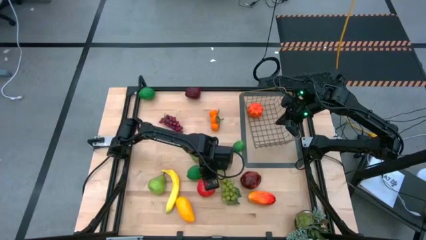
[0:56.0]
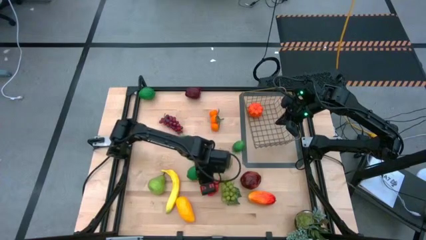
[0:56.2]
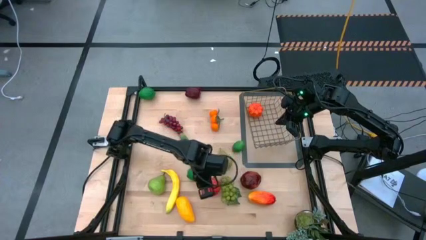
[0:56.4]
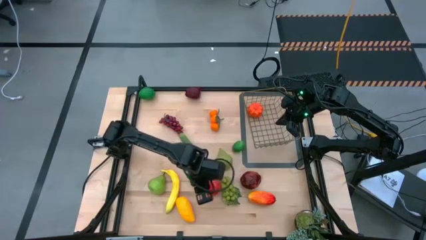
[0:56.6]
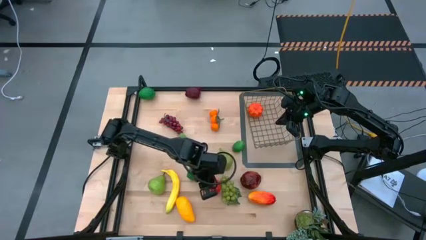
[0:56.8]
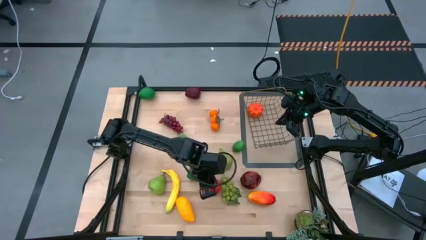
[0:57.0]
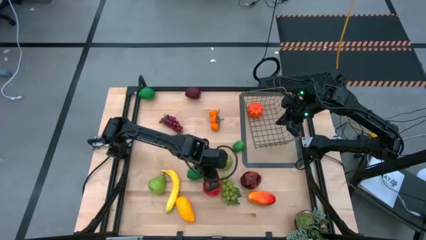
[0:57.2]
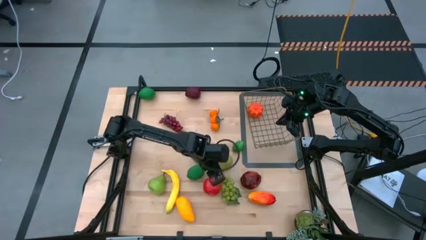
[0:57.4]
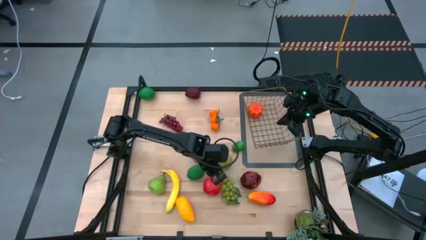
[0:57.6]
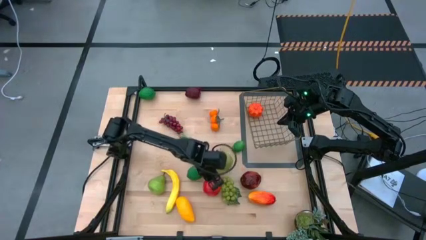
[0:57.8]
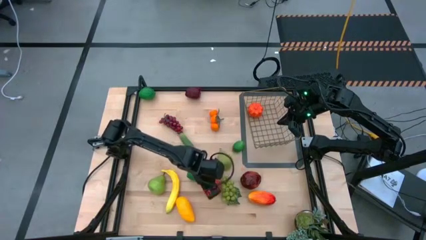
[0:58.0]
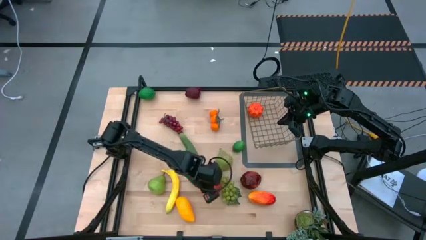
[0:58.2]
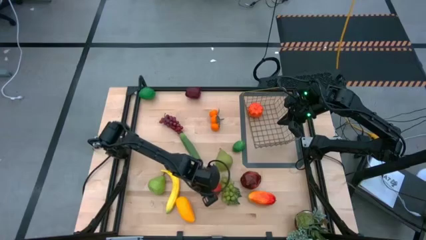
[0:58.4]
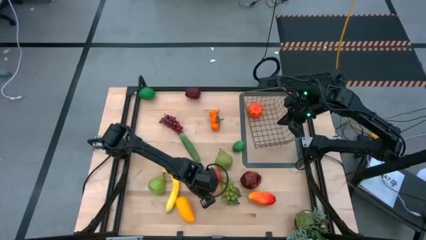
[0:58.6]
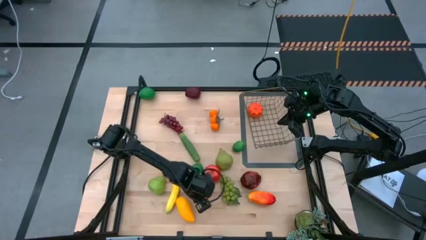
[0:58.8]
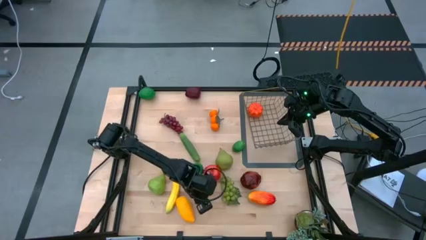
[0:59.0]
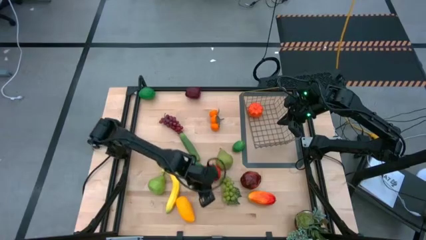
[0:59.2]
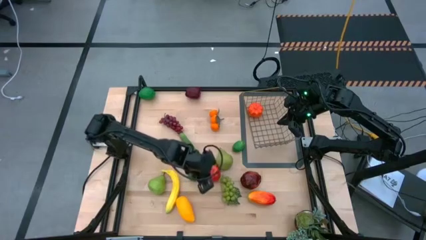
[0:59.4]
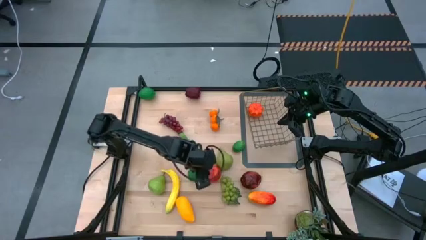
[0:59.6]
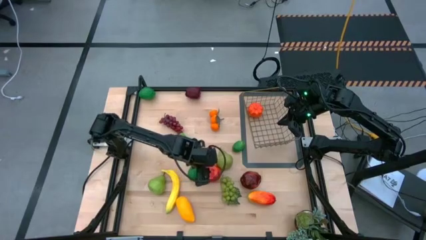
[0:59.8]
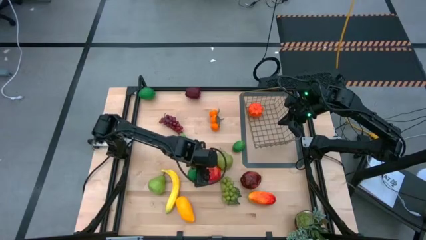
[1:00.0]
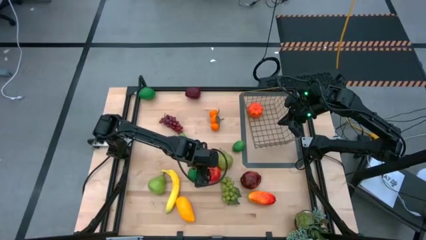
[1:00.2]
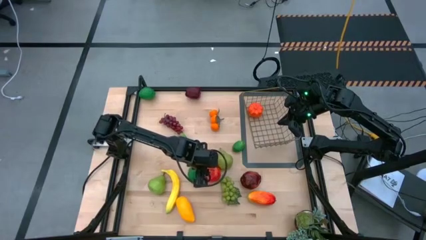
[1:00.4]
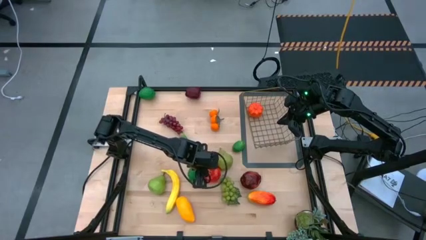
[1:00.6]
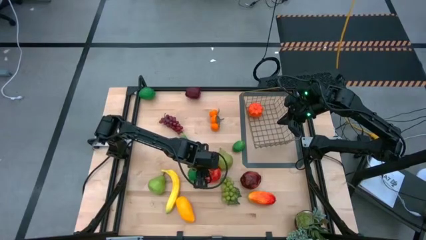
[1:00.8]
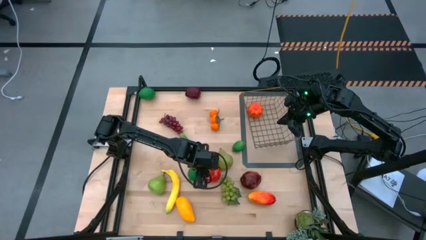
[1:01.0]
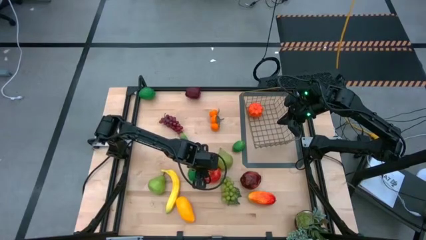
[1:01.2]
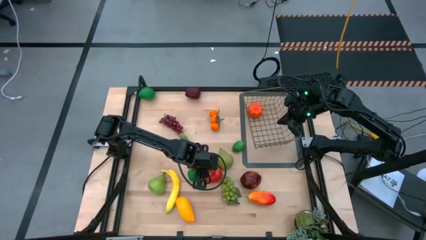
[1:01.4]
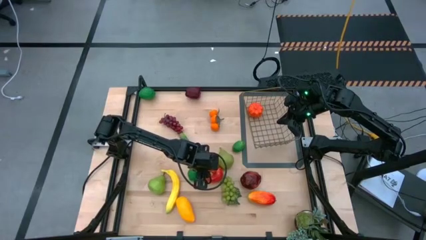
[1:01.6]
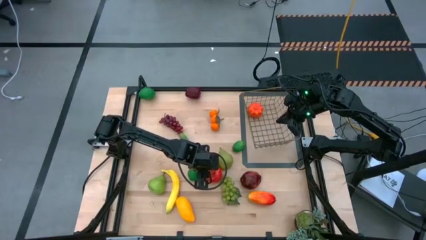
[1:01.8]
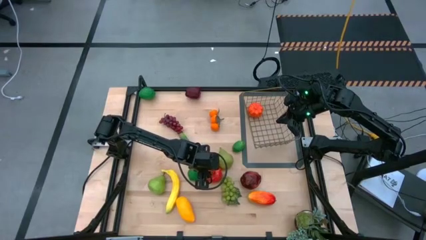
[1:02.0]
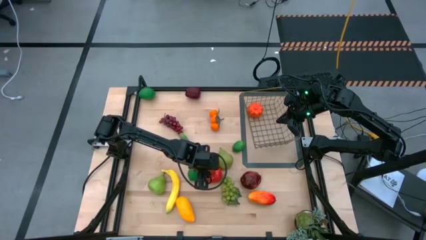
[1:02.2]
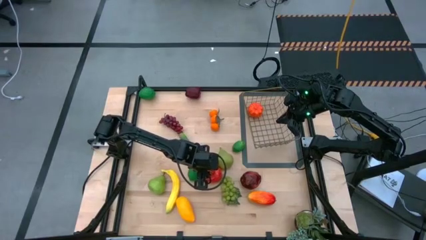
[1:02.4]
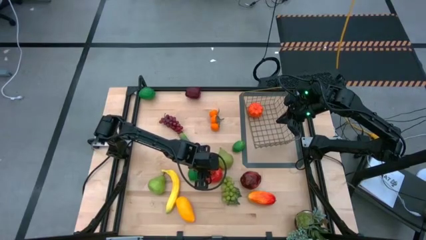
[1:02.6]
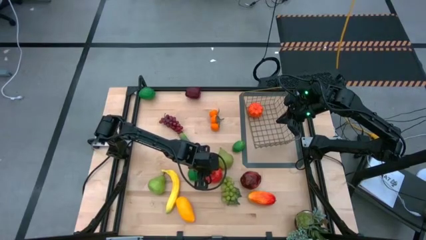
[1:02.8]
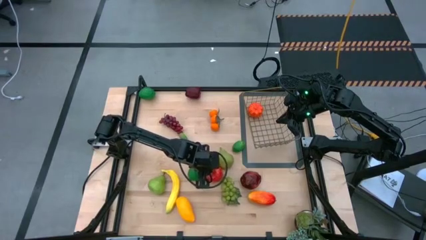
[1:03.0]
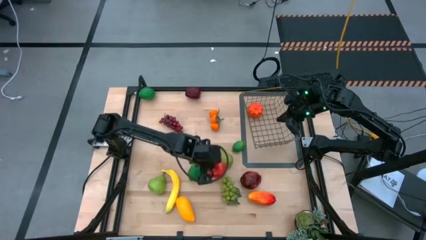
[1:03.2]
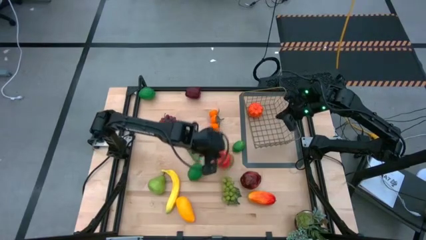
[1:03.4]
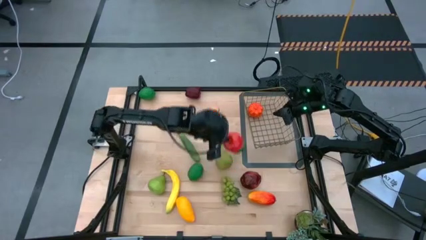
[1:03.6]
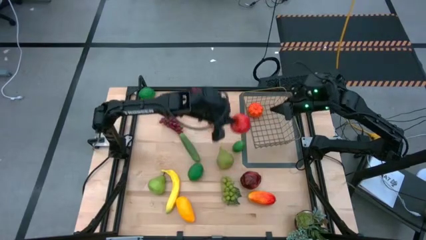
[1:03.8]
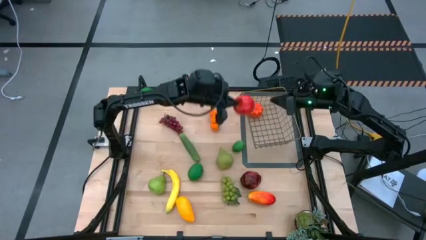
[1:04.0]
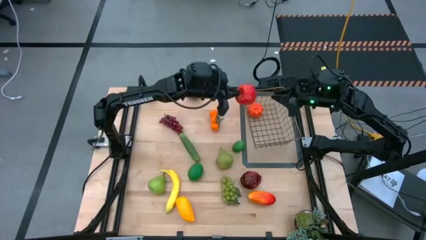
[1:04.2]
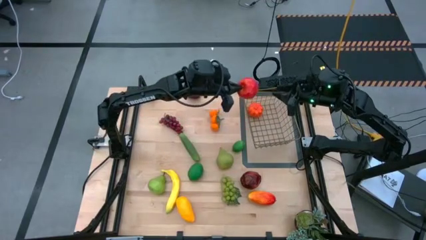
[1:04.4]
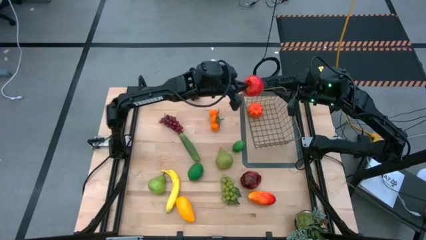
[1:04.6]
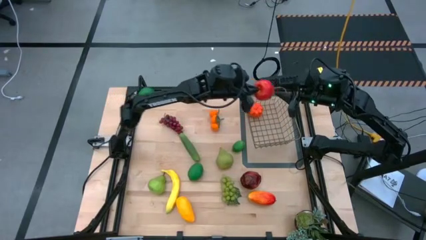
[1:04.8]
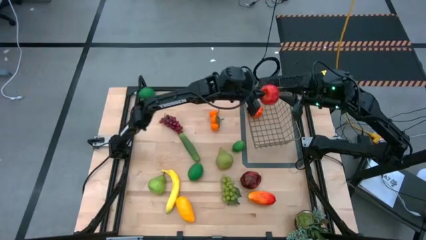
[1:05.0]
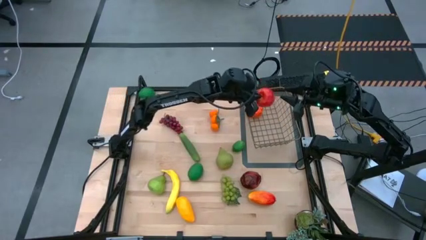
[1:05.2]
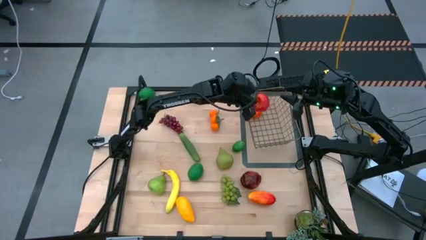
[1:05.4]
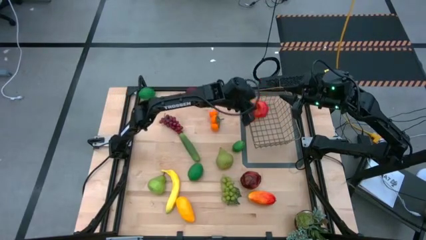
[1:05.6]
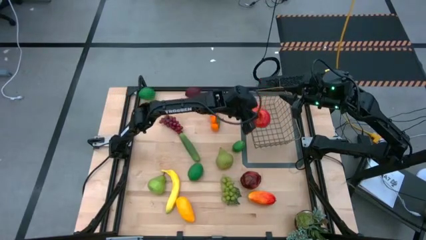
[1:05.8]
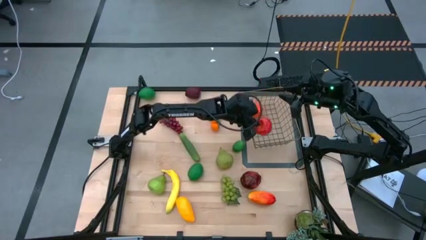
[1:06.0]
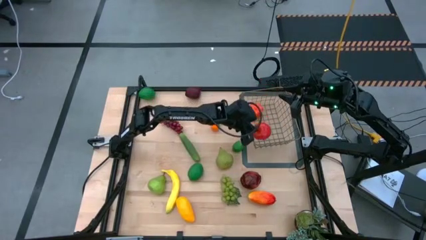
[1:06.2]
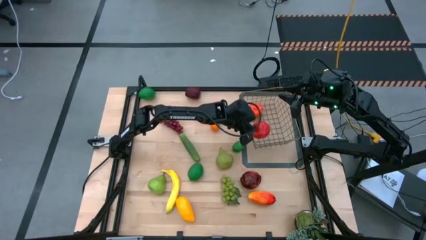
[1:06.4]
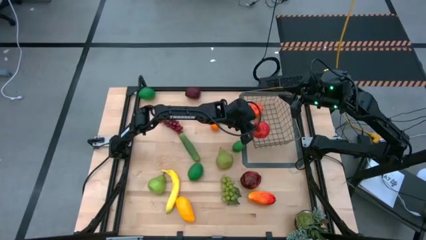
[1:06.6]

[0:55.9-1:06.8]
Task: Build produce basket
Put the light red apple into the wire basket

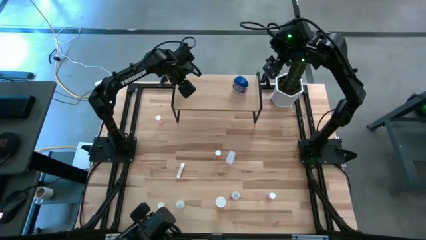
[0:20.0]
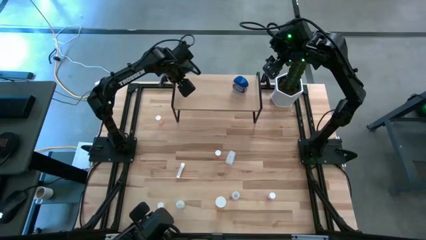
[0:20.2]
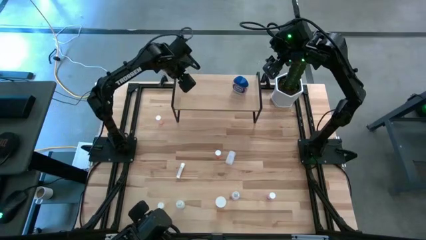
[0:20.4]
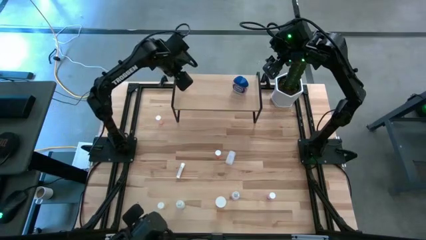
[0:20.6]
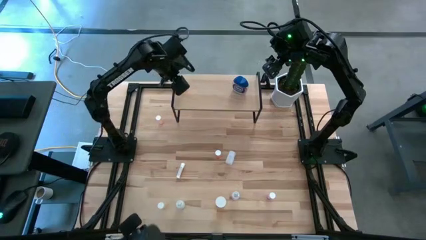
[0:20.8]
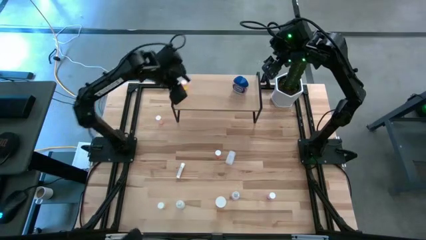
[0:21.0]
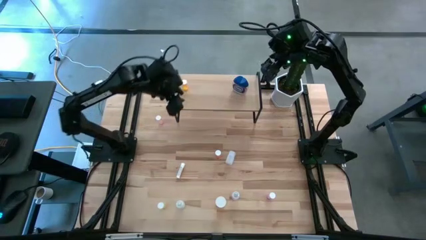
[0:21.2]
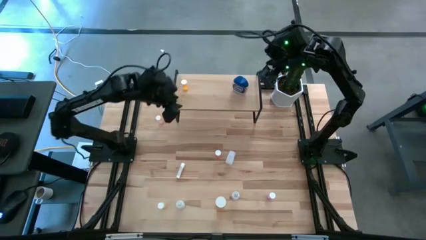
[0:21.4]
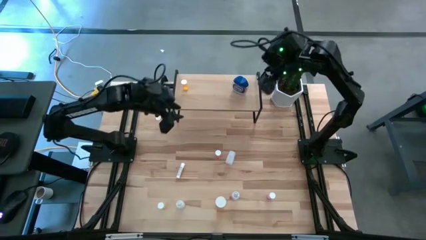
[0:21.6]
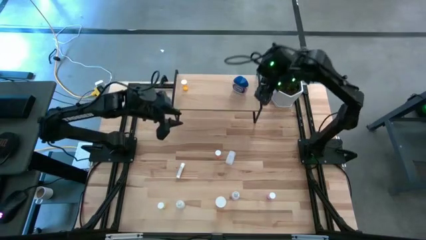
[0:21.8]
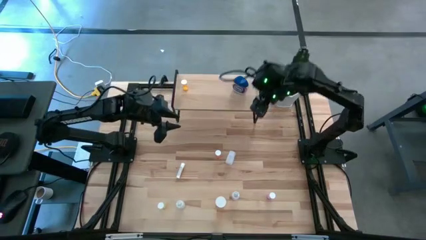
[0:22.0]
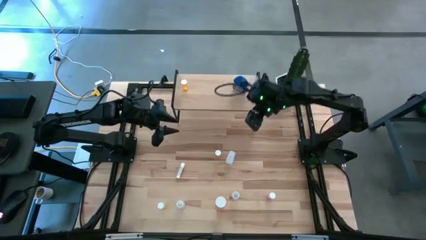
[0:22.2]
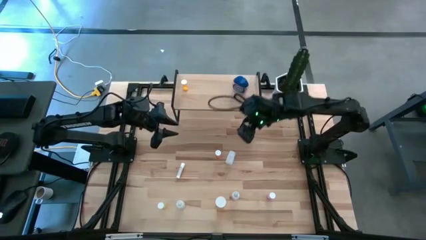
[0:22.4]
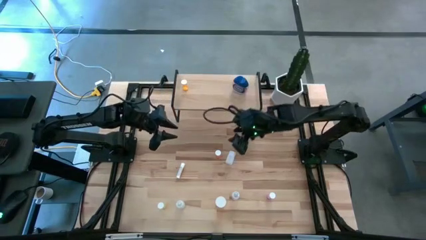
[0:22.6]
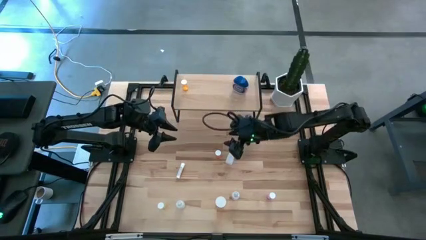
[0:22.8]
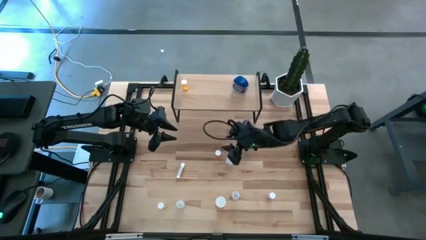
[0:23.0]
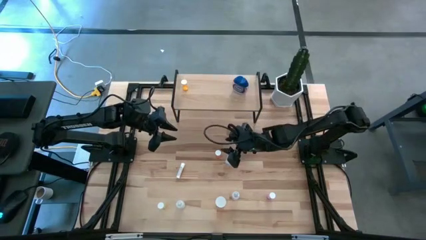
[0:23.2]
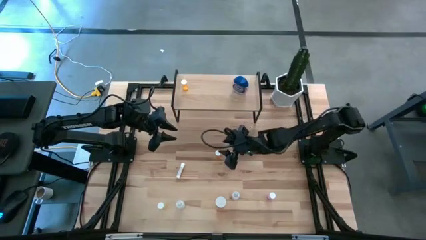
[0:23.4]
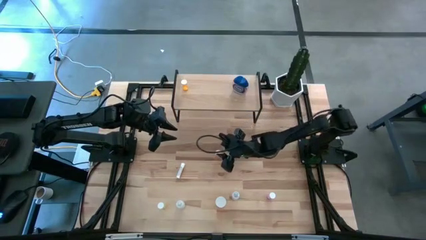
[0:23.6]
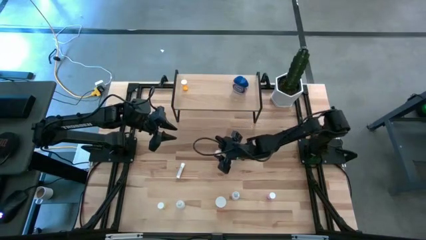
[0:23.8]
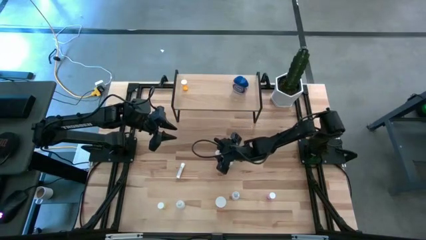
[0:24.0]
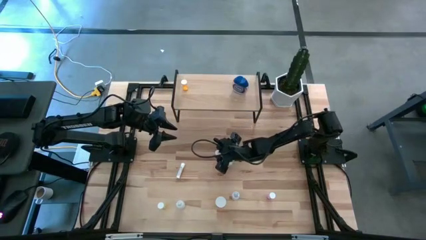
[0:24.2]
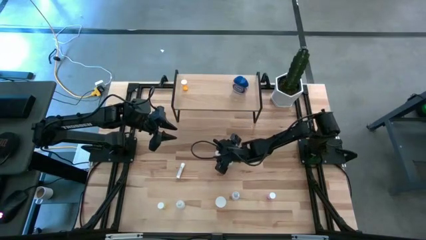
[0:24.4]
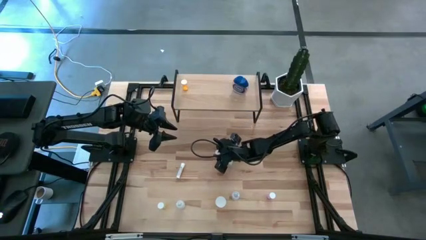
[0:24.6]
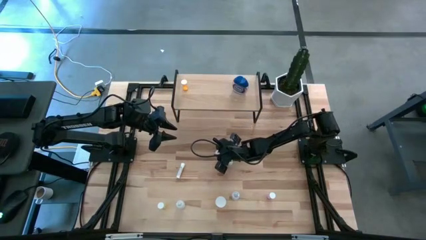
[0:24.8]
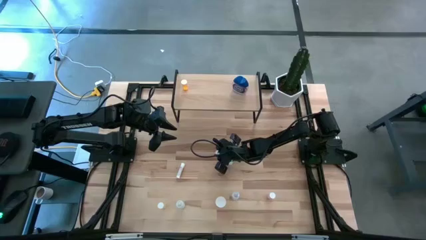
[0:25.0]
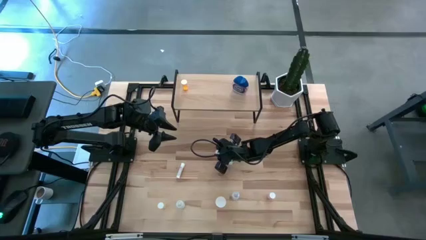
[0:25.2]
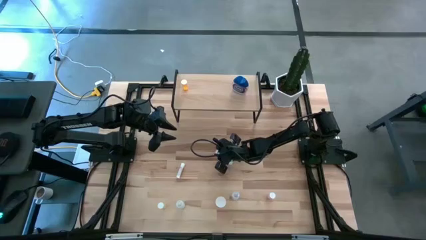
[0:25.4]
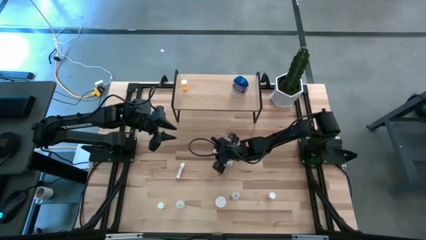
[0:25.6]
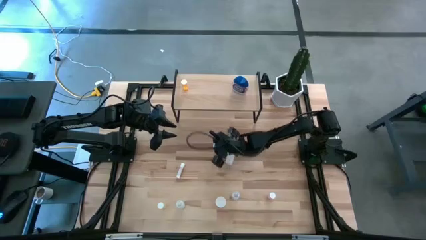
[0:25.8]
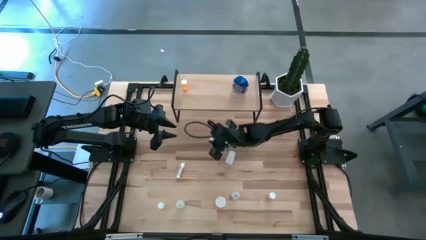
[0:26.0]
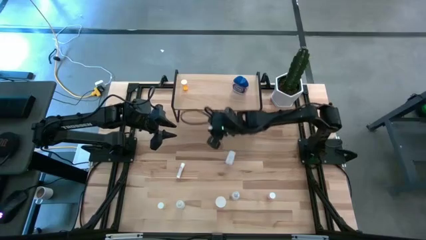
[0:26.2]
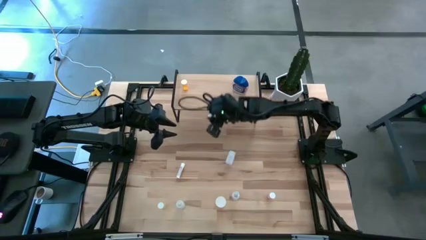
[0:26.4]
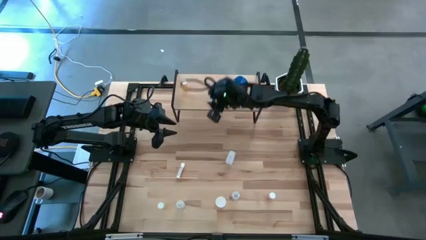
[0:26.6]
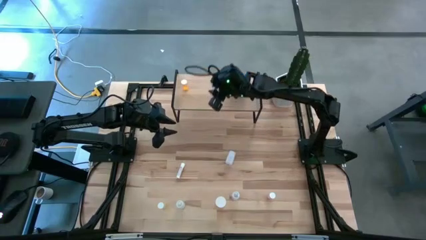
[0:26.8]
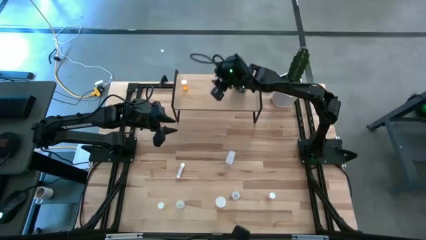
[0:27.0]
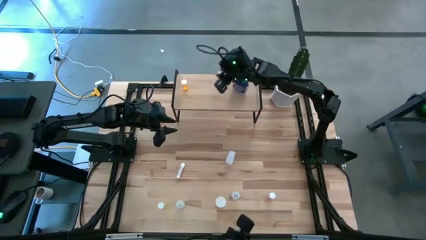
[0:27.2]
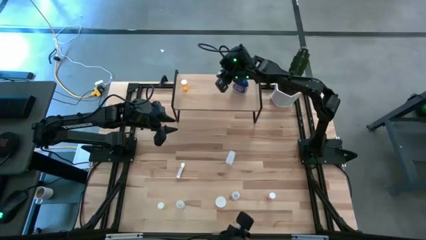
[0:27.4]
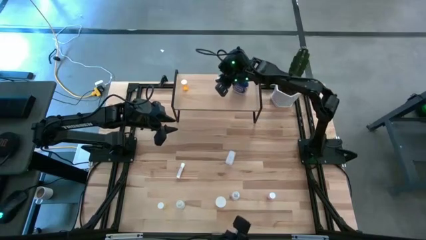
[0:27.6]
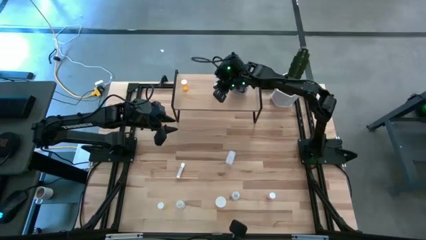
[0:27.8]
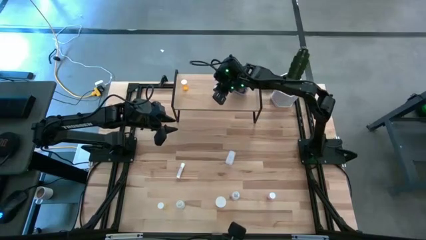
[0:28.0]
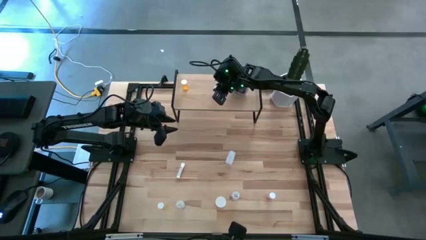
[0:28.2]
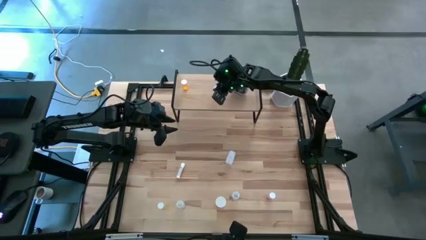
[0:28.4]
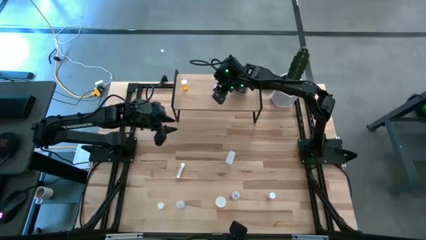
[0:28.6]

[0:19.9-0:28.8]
Task: Pick and place medicine bottles onto shelf by color
Put the small orange pill bottle on the shelf
